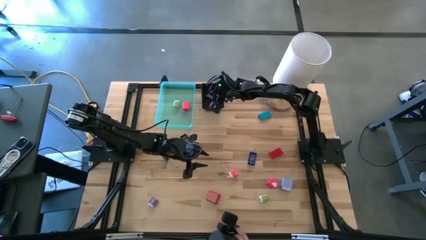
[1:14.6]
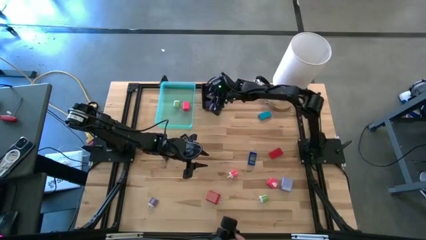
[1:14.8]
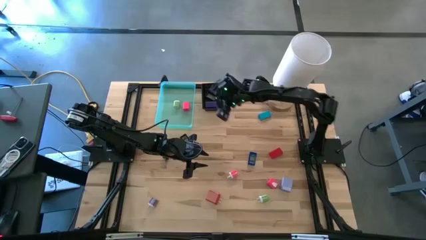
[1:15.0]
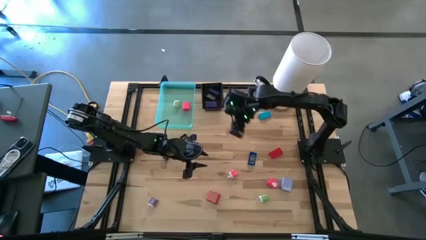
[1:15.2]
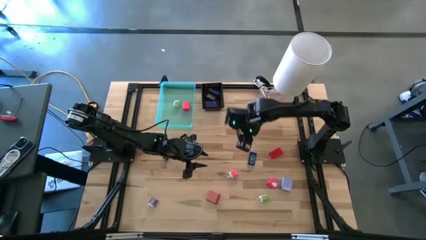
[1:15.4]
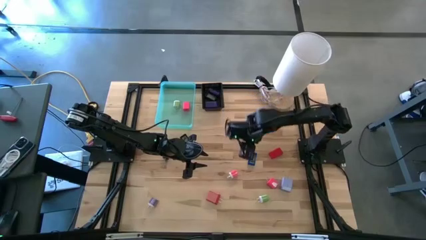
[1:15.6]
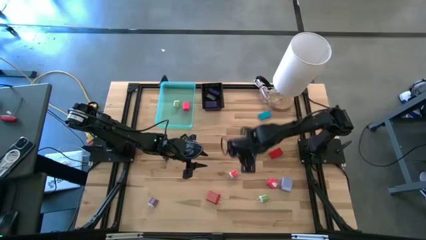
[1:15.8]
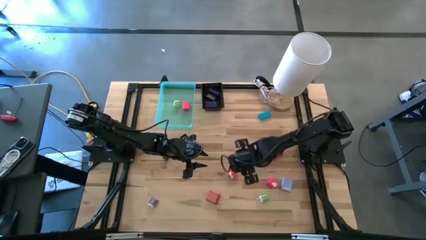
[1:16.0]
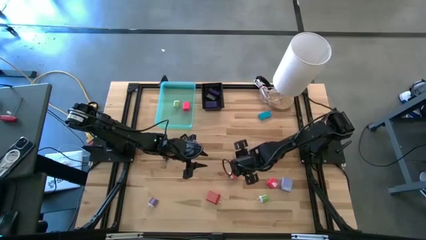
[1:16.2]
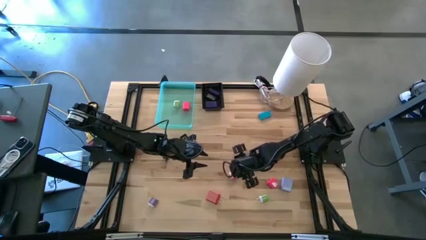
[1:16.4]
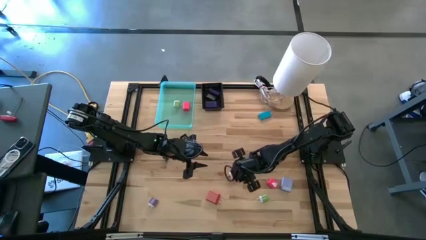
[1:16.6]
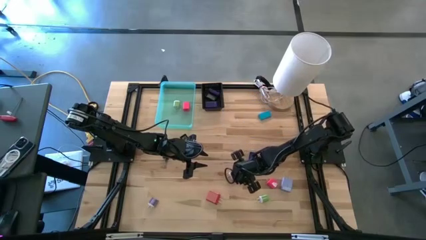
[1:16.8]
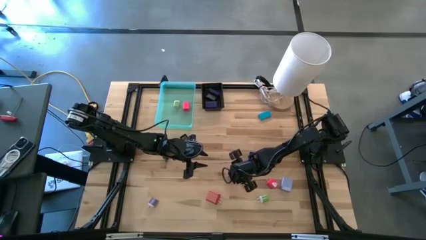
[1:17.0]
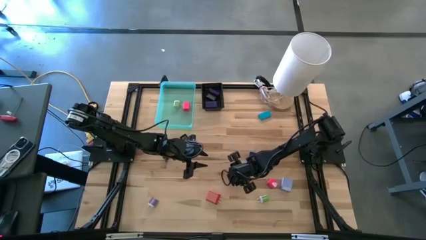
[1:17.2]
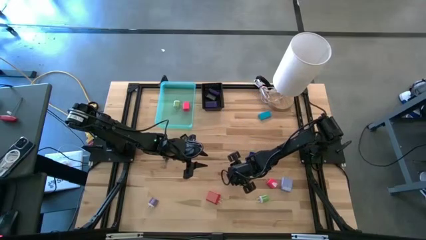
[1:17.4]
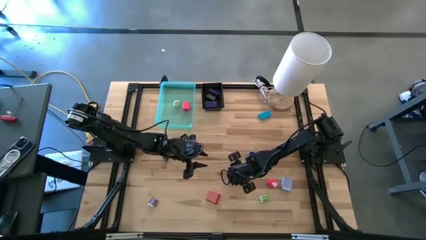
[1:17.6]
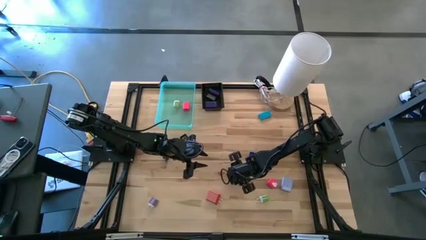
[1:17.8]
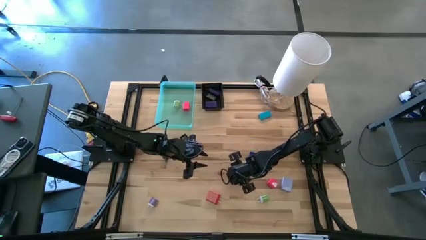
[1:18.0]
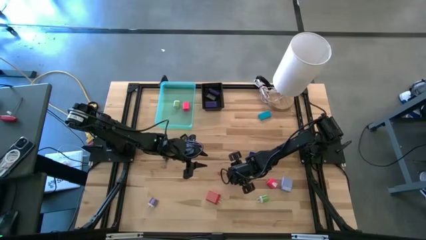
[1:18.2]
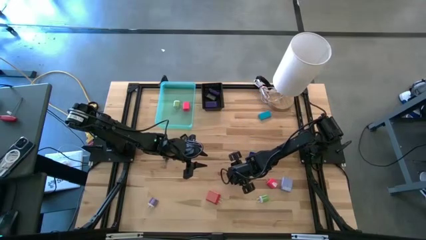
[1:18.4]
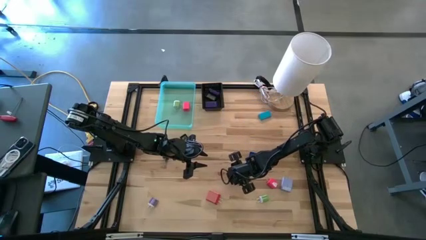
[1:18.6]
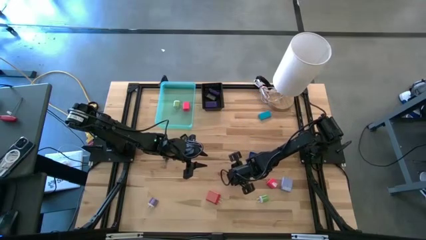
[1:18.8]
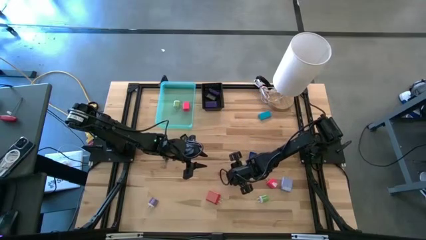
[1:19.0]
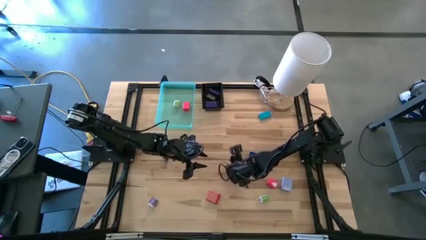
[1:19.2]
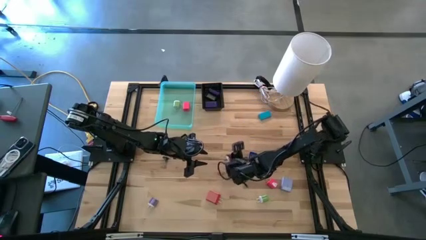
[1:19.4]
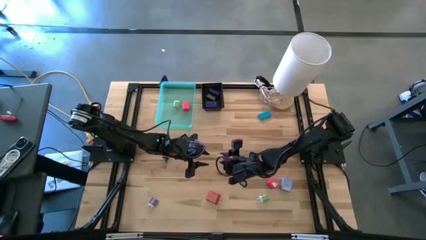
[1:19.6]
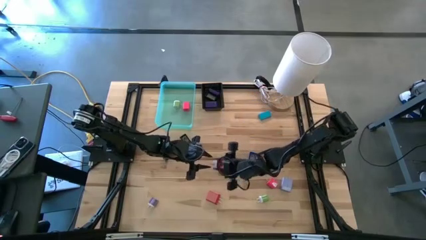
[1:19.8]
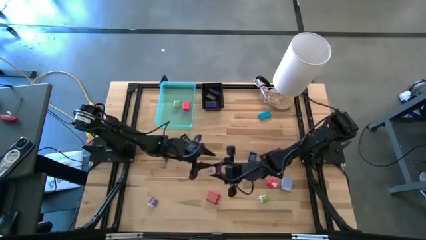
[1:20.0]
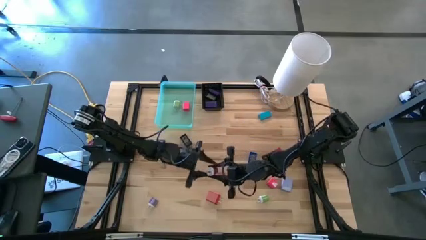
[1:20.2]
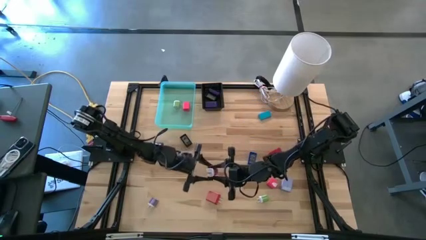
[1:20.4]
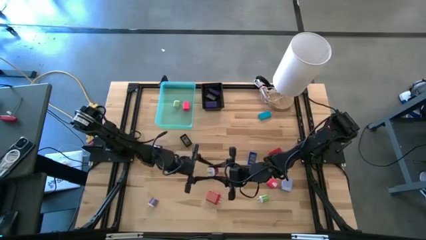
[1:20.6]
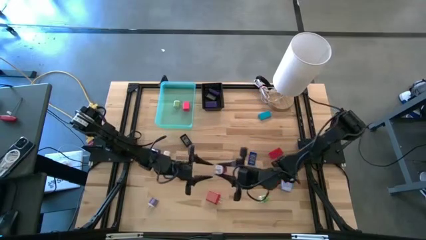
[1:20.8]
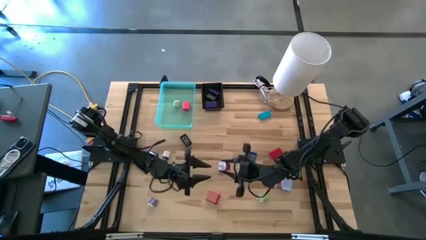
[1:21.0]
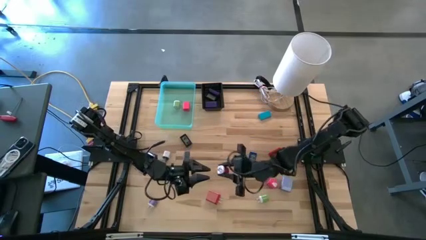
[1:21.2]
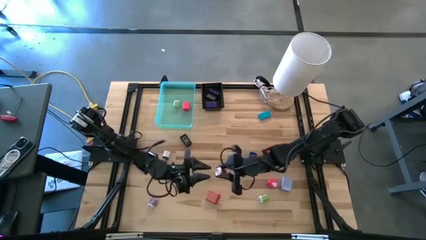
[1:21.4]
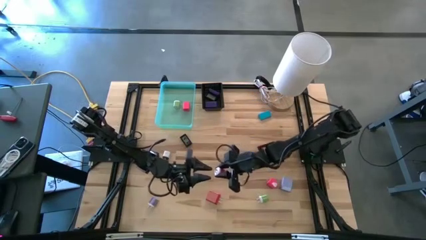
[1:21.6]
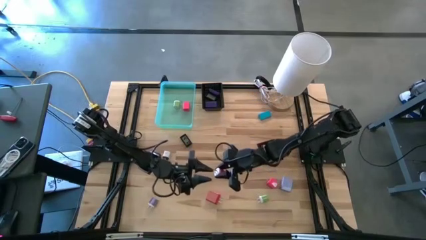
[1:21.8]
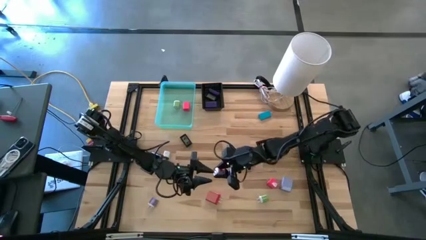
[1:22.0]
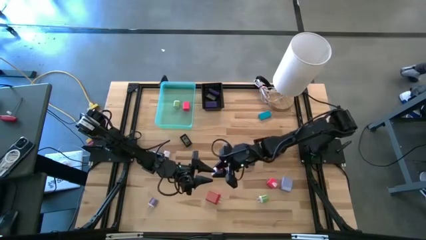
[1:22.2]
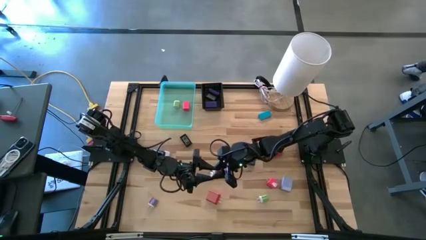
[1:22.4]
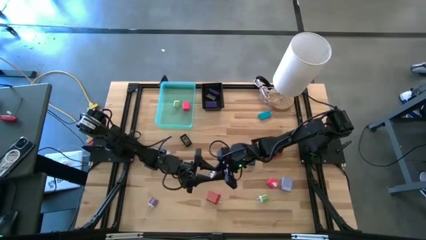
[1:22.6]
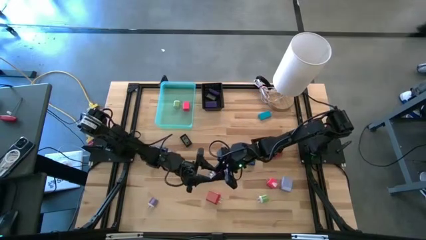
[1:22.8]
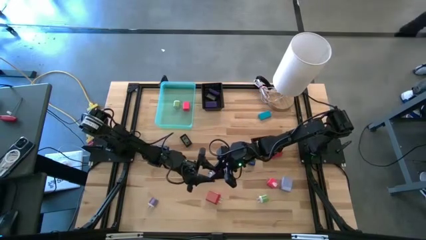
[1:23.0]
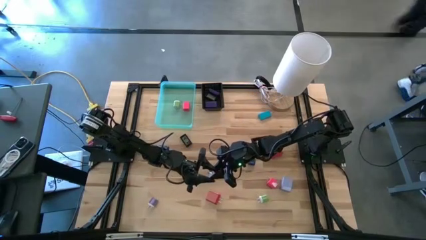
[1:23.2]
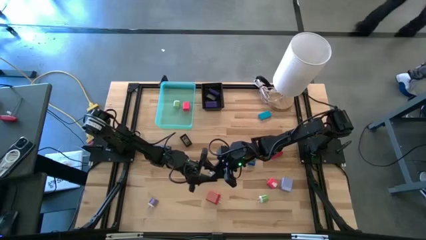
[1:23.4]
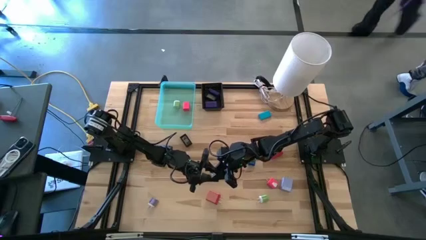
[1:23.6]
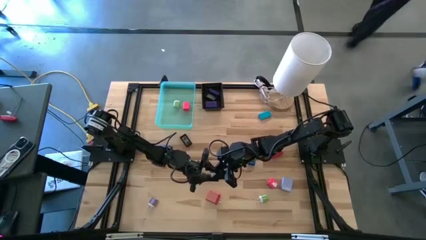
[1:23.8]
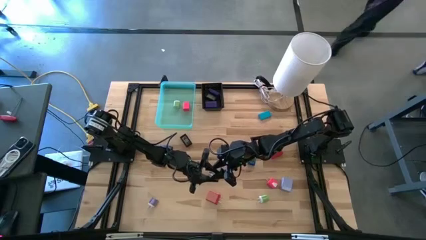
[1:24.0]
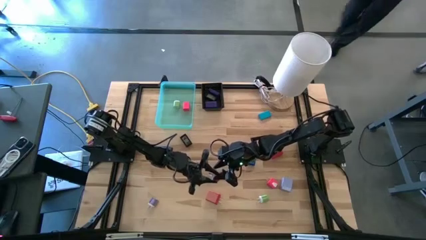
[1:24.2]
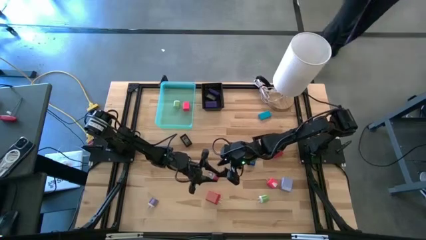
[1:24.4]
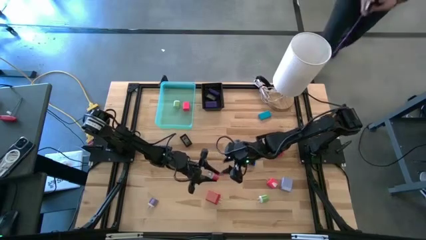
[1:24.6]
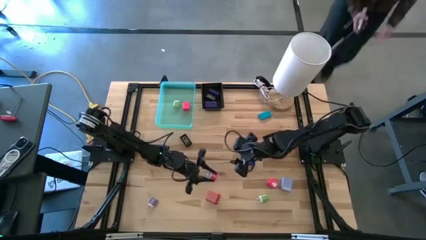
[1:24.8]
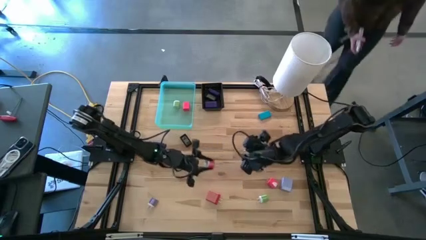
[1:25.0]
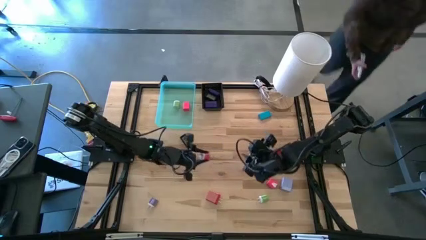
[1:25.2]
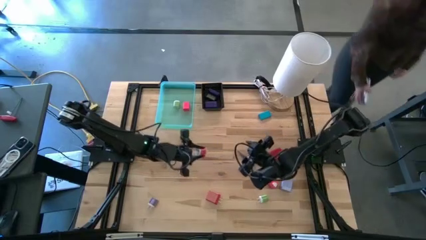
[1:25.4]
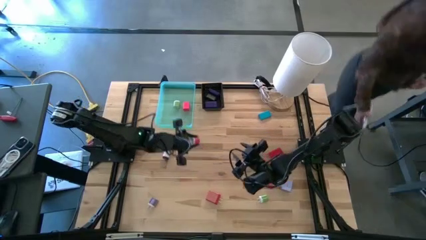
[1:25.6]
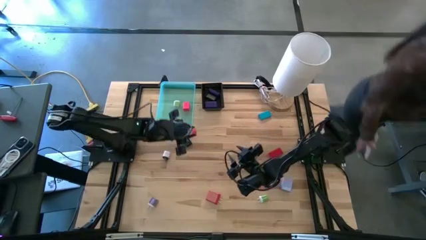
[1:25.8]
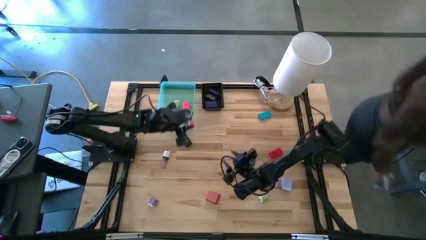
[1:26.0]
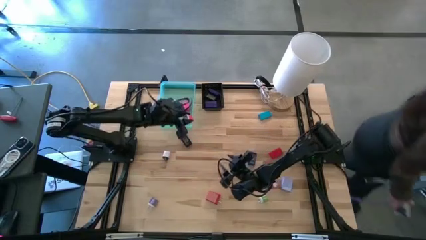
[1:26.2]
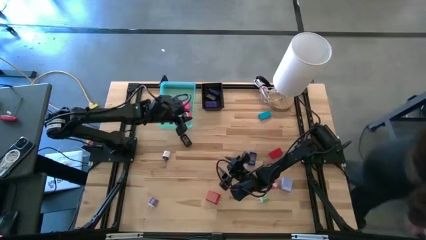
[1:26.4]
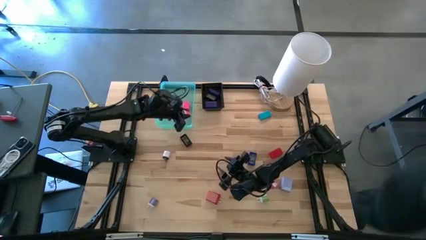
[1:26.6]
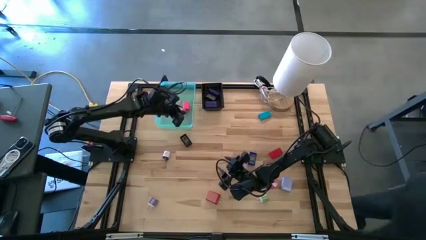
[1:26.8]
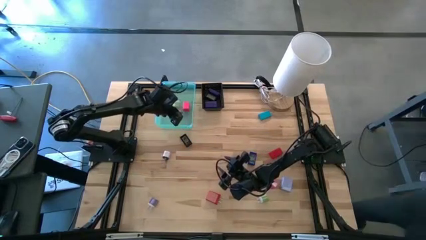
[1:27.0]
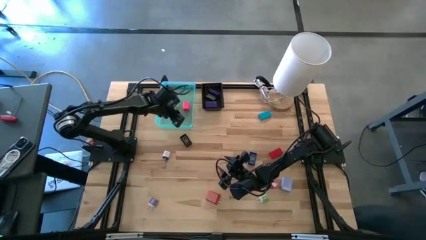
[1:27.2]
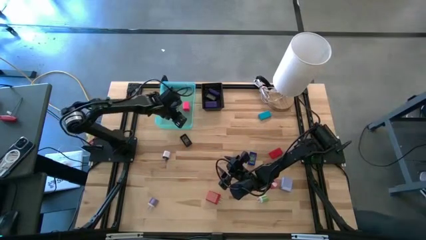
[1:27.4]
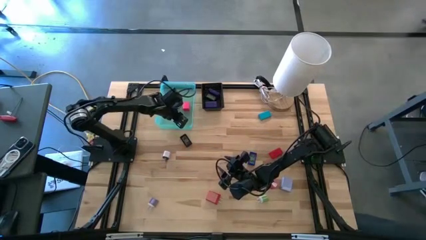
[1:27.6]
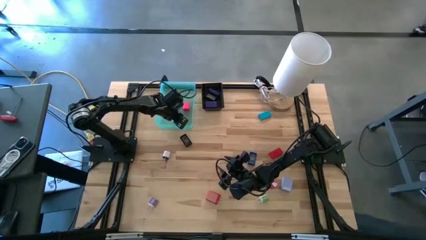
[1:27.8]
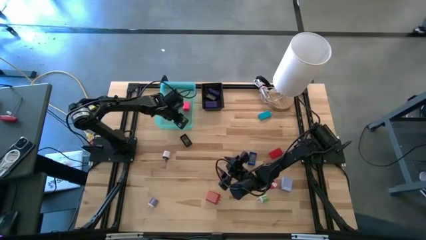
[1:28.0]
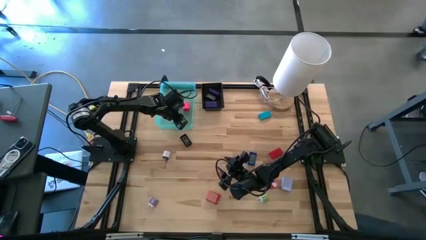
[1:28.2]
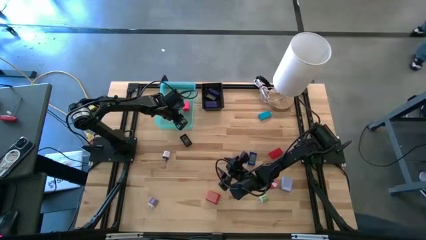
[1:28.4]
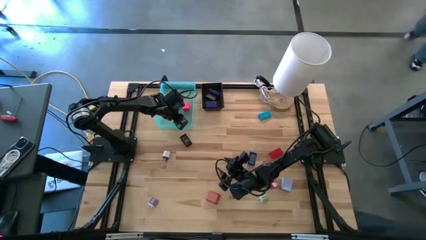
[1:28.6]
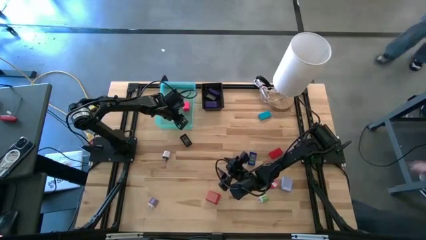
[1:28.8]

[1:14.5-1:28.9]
Task: Pick & Place Office items
Put the left pink charger adapter into the green bin

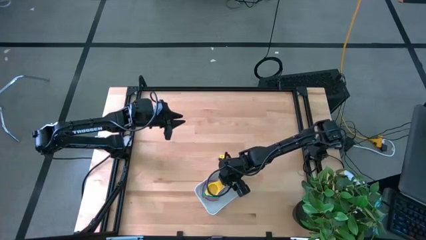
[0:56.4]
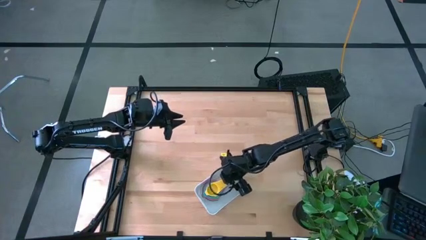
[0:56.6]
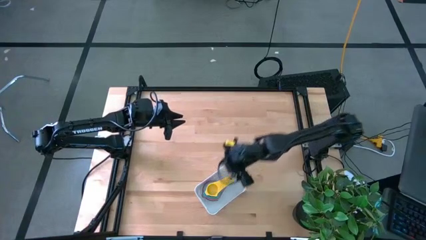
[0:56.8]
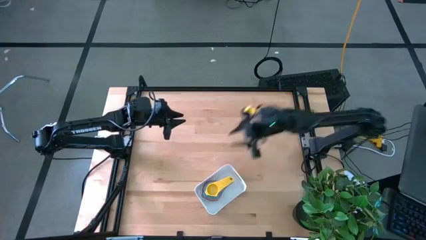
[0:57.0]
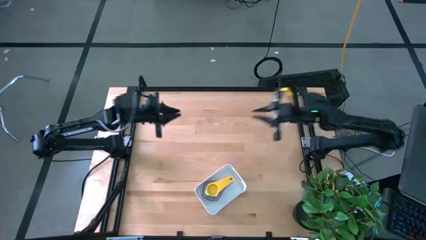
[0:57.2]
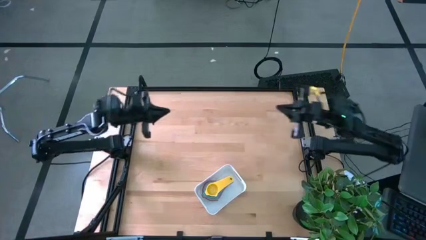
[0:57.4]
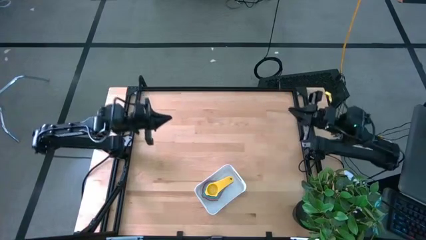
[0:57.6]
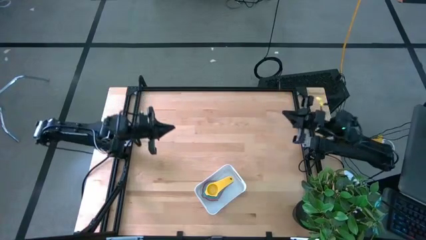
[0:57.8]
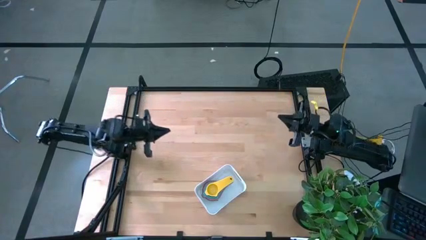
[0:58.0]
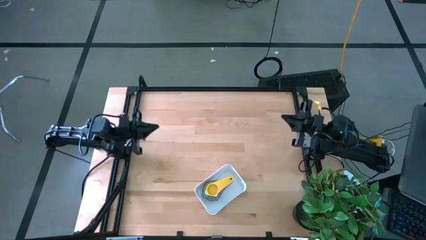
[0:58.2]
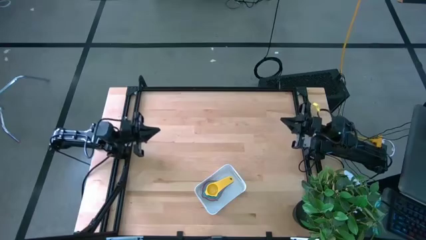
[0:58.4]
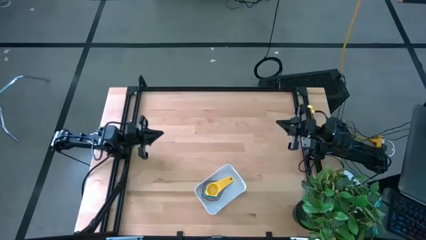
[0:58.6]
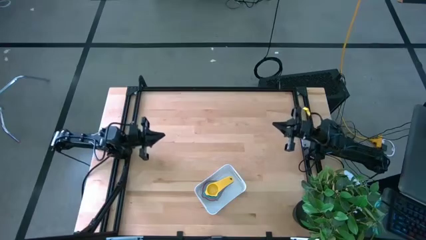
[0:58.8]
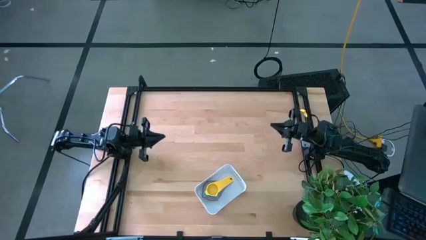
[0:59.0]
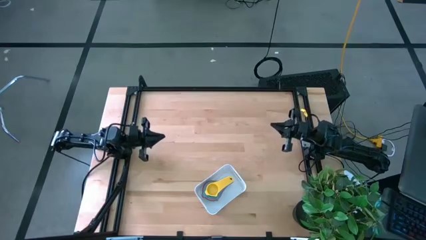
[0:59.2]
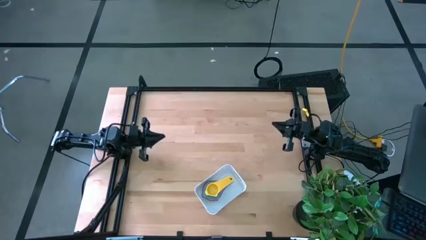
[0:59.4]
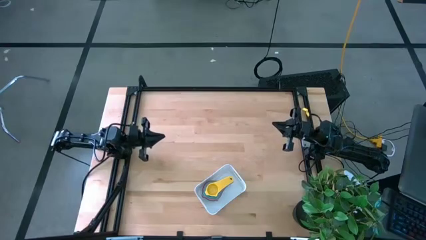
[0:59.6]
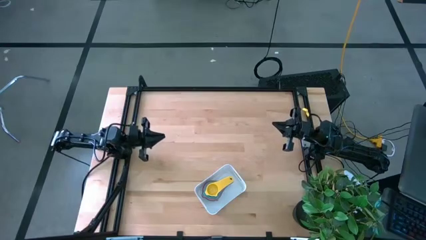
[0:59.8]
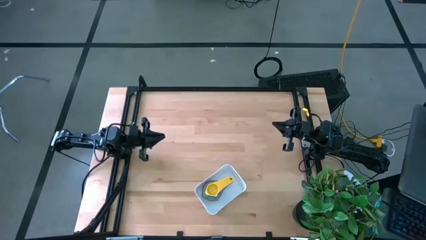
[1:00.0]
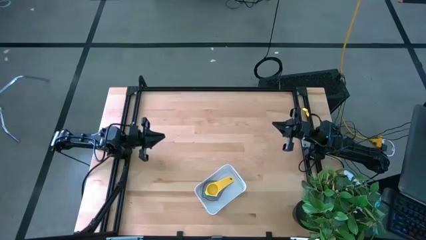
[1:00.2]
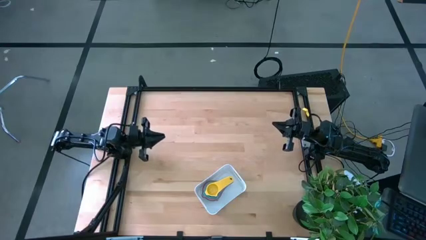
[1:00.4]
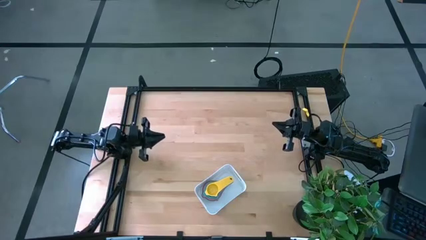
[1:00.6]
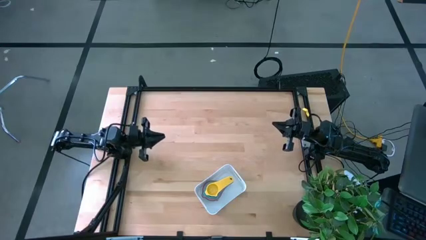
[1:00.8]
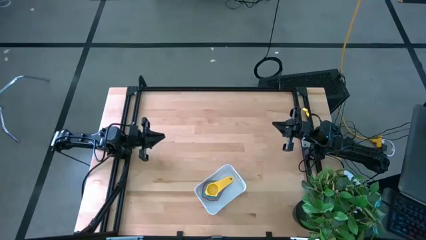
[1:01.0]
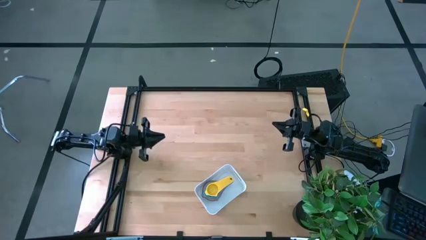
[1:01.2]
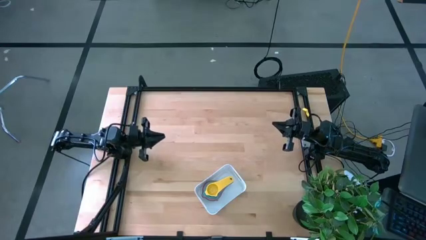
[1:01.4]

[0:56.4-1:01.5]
Task: Nest measuring cups in basket
Return to Home Position
